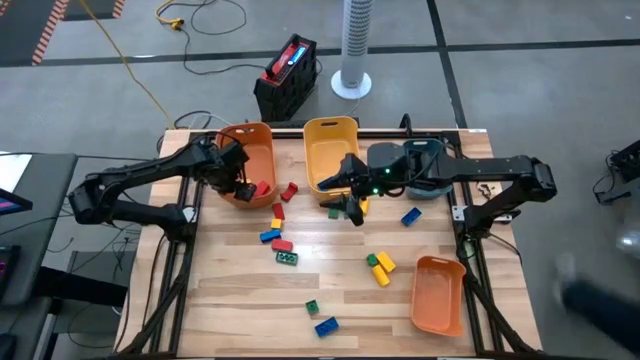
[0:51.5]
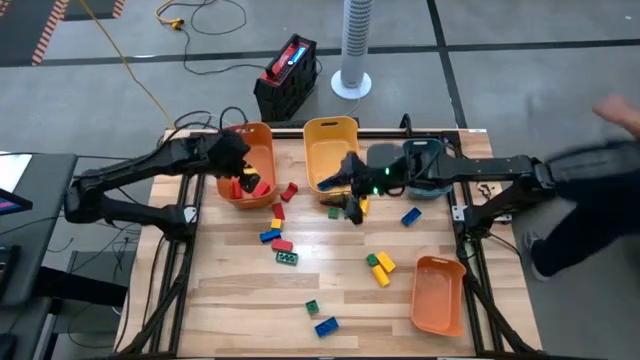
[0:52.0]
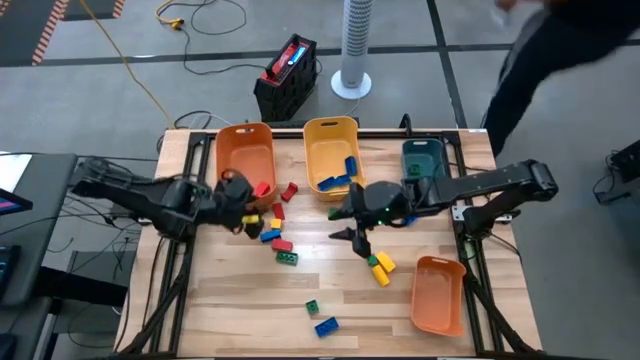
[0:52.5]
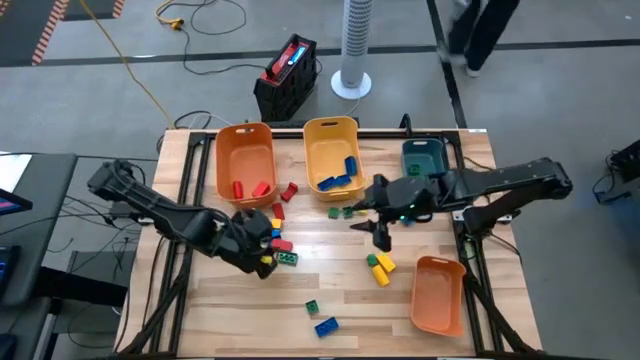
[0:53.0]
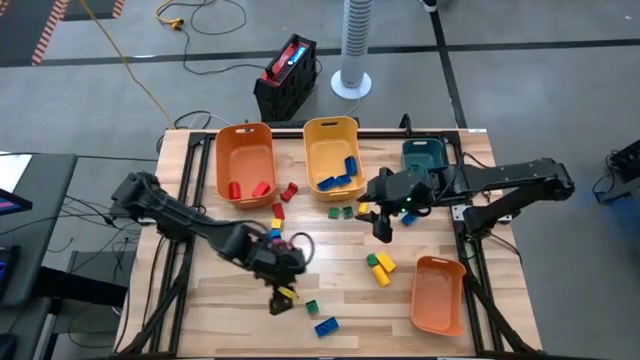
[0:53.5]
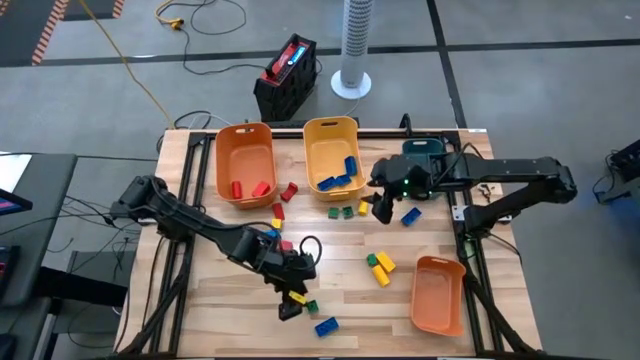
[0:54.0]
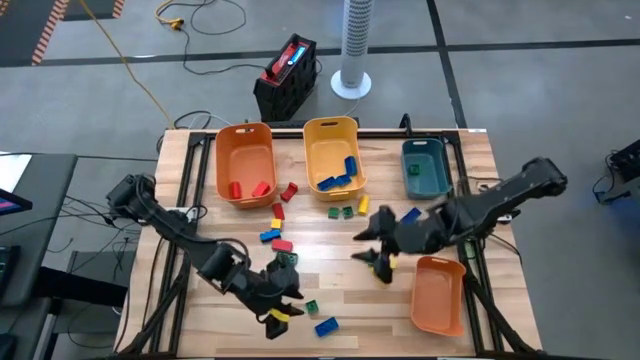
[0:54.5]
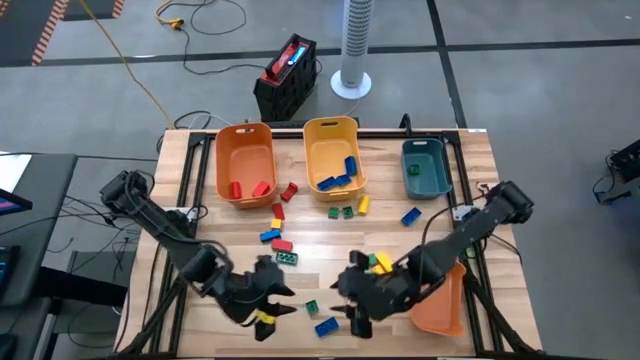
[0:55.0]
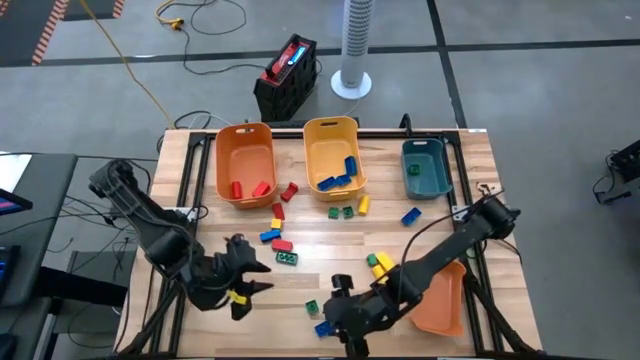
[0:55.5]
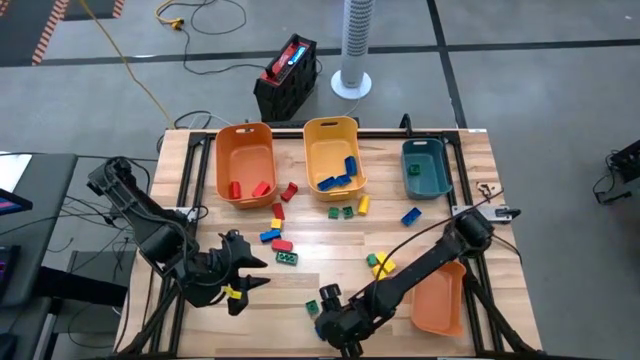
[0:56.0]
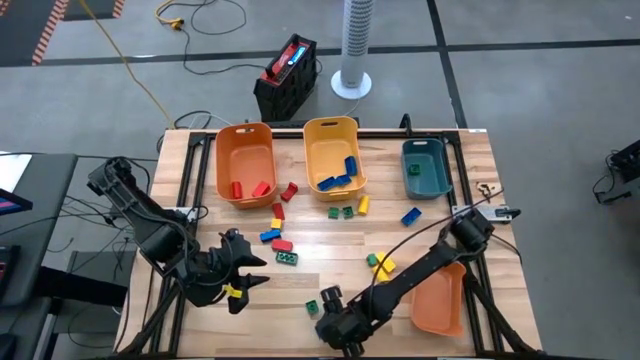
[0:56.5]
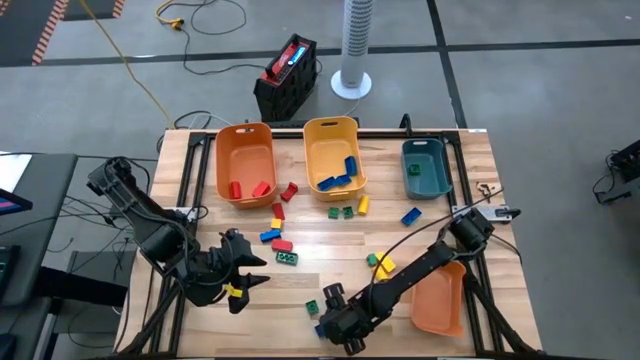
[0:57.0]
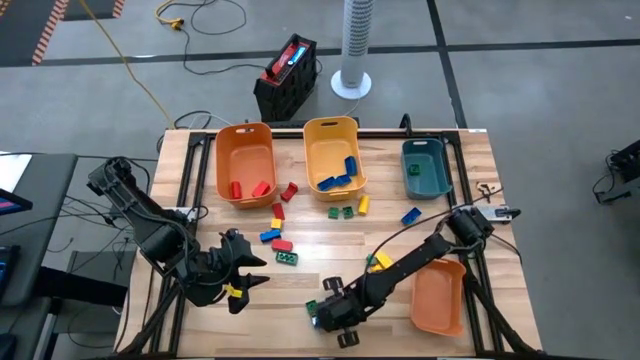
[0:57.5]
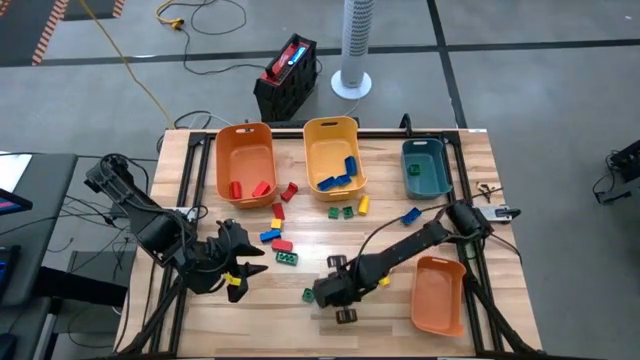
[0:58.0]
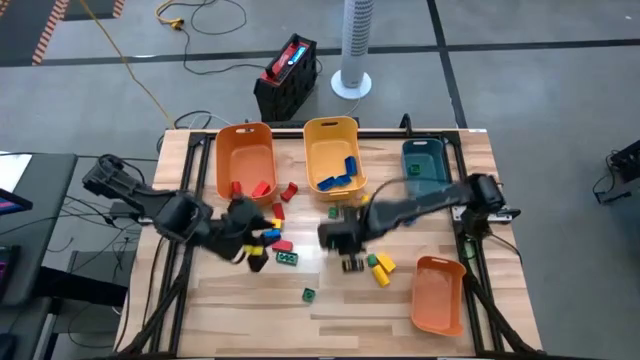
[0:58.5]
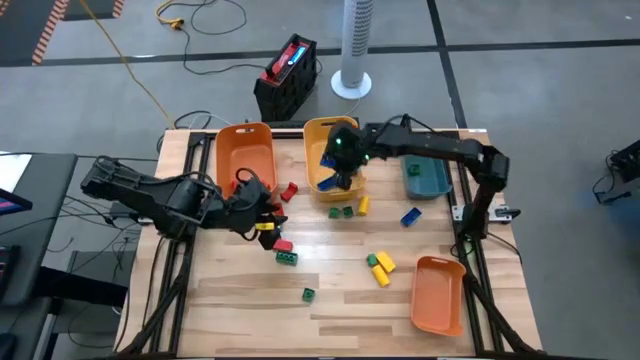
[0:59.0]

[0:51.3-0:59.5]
Task: Sort blocks
Put the blue game piece into the yellow bin

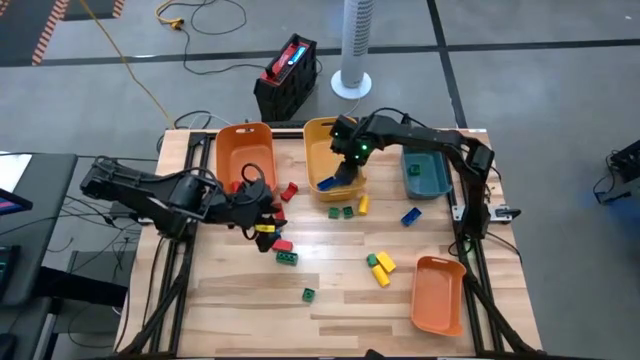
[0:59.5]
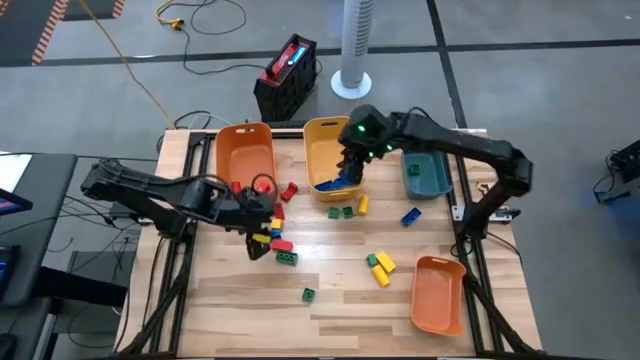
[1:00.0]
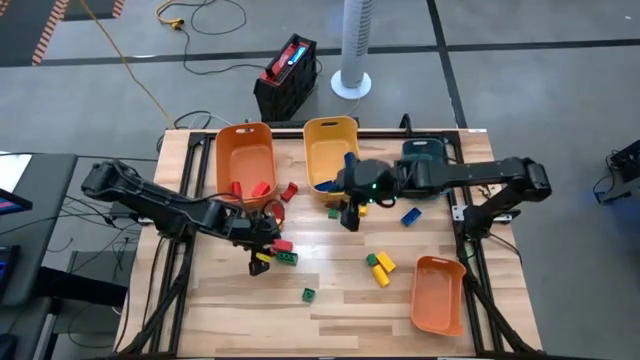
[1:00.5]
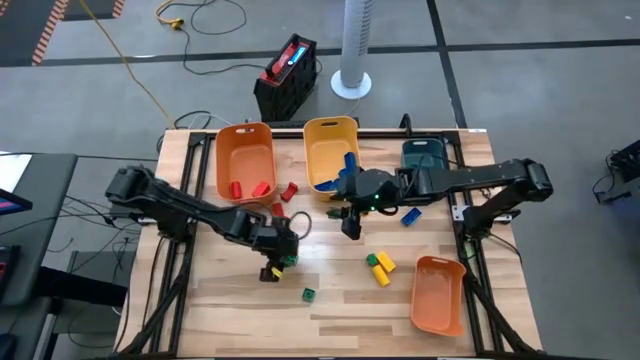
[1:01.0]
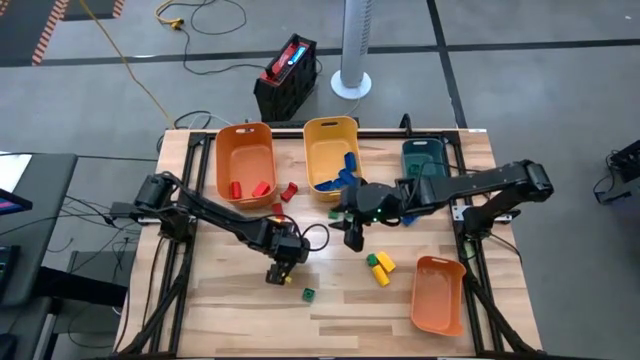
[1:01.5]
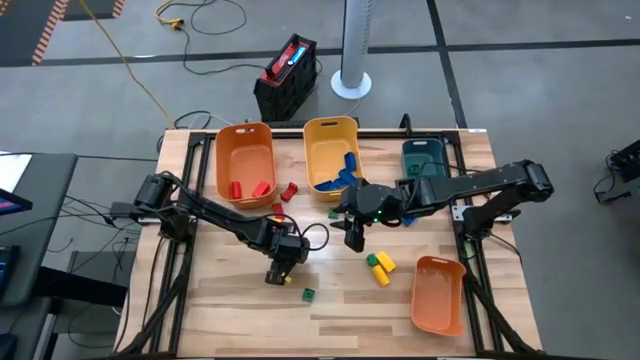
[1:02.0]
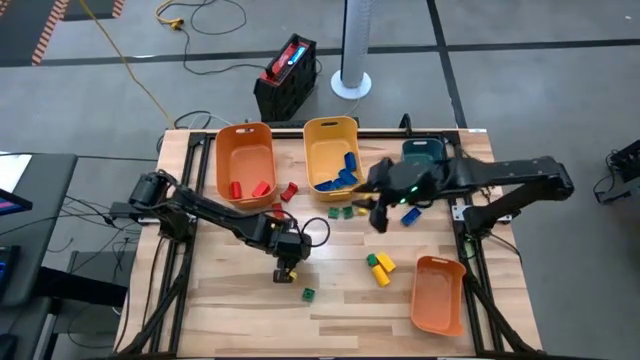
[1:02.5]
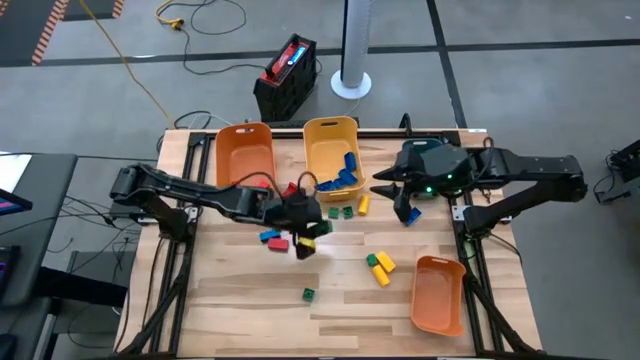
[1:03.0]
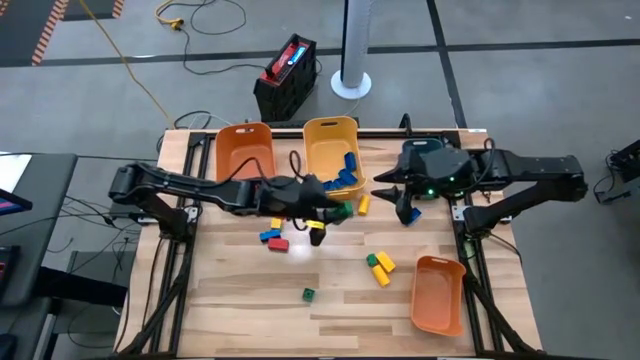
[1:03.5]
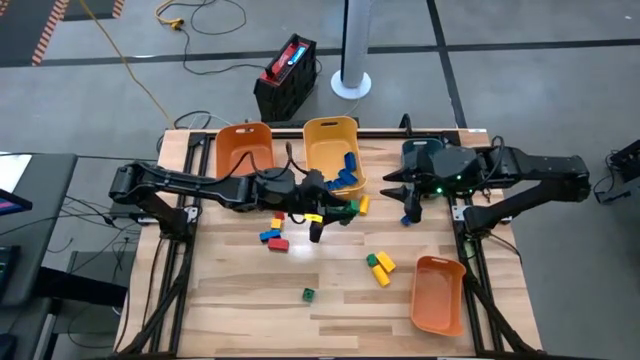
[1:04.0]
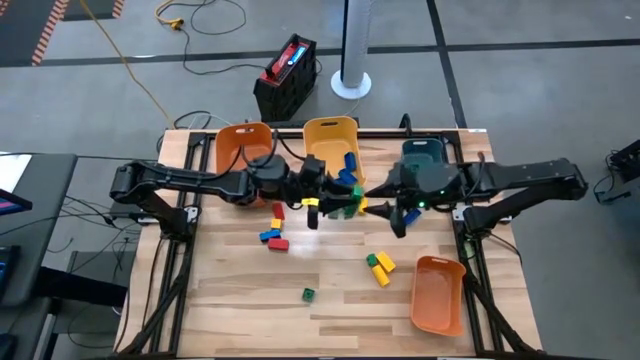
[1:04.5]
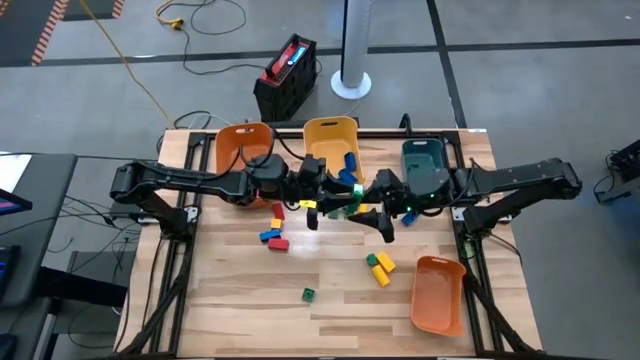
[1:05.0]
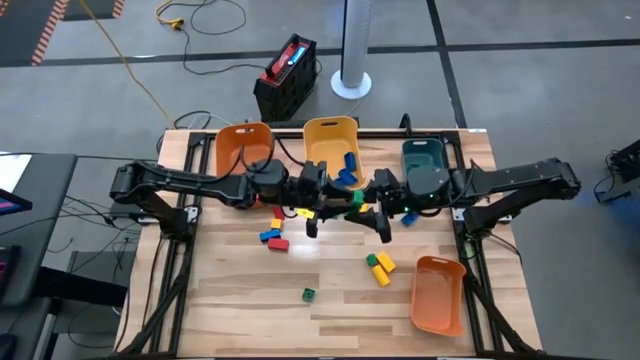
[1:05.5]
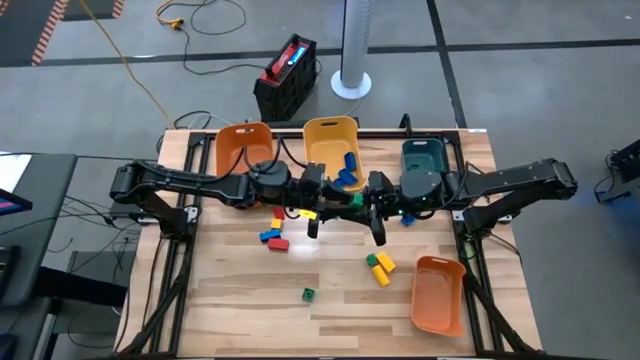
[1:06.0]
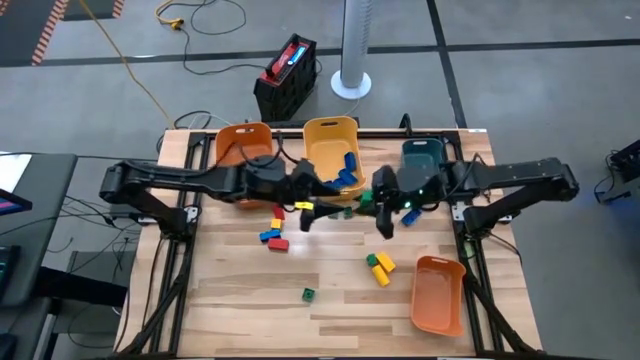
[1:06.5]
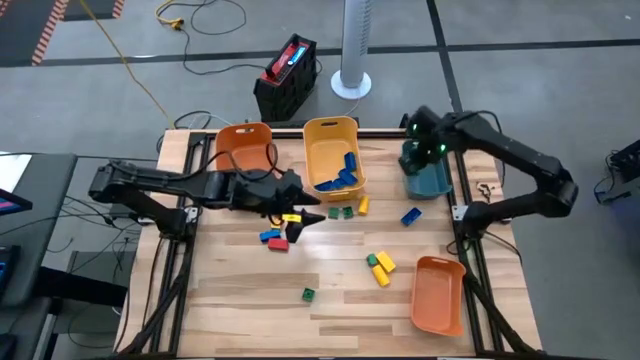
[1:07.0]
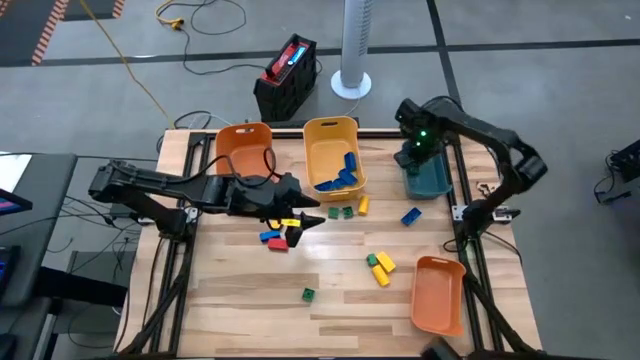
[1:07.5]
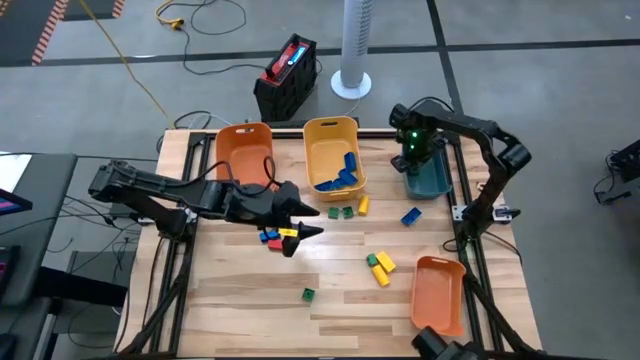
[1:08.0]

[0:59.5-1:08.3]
Put the green game piece into the blue bin

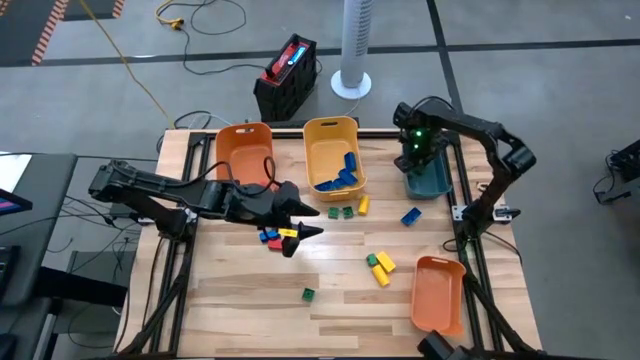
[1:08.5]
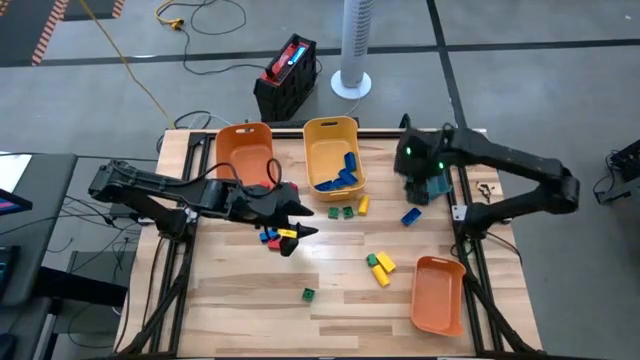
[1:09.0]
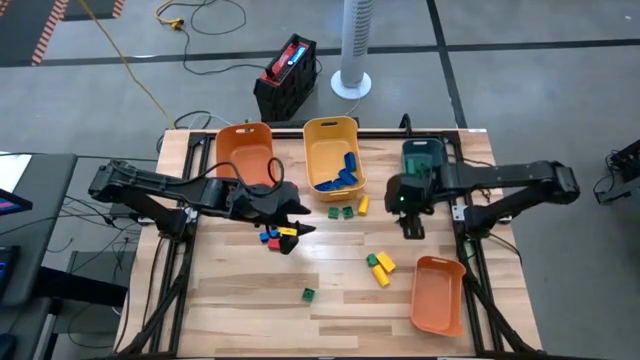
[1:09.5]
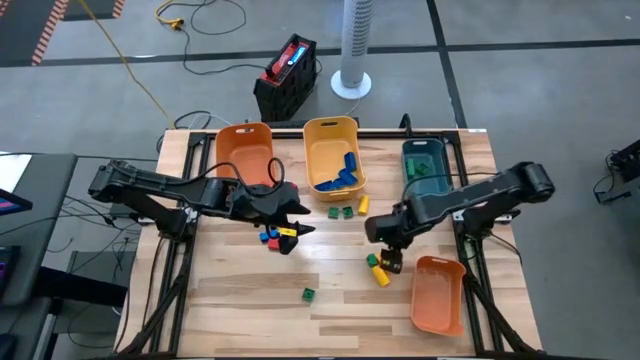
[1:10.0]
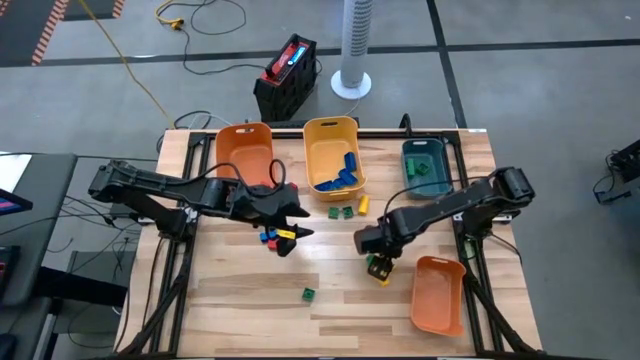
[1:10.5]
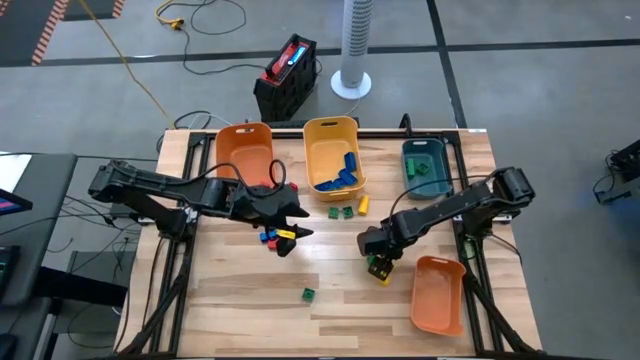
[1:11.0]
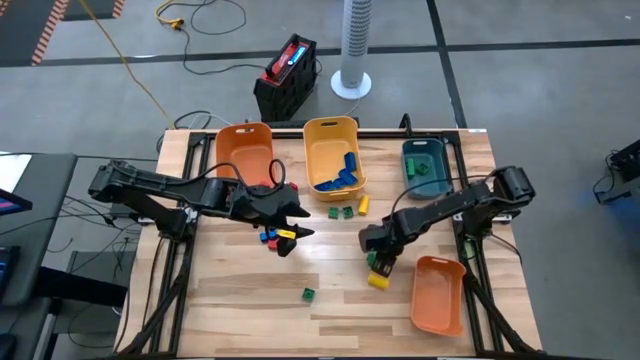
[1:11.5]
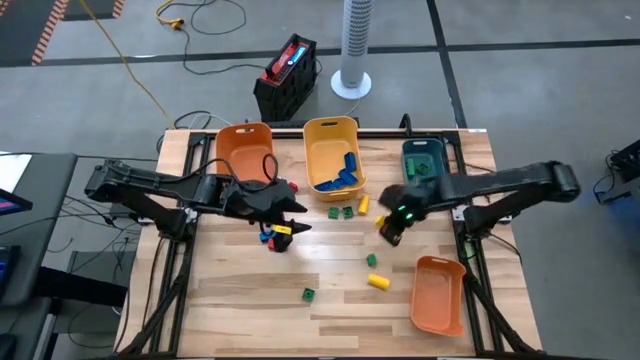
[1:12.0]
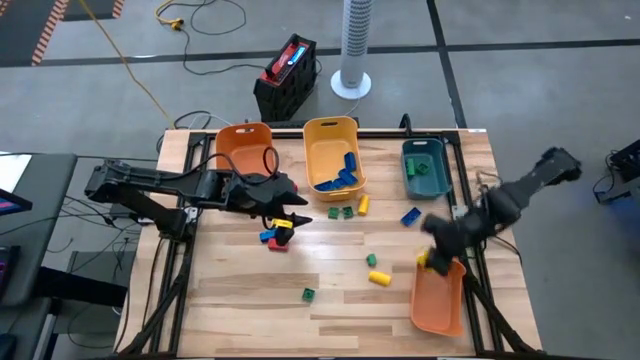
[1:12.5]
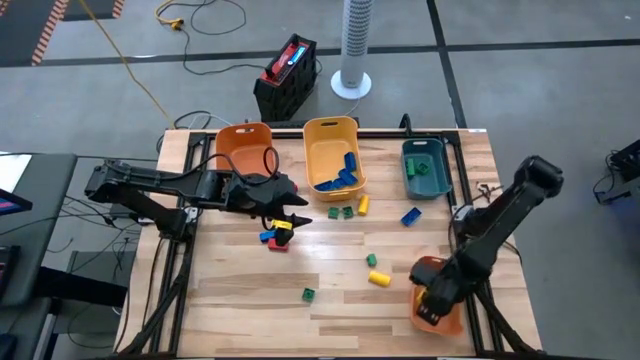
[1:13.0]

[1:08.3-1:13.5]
Put the yellow block into the bottom orange bin
